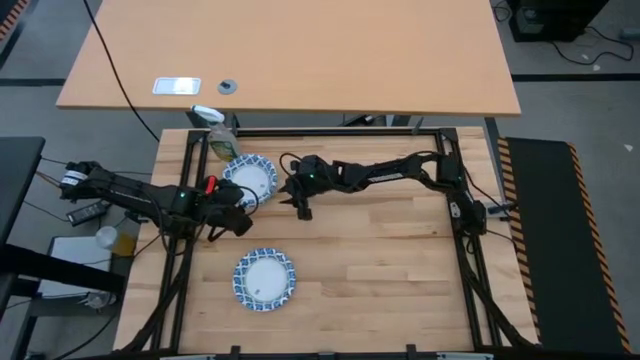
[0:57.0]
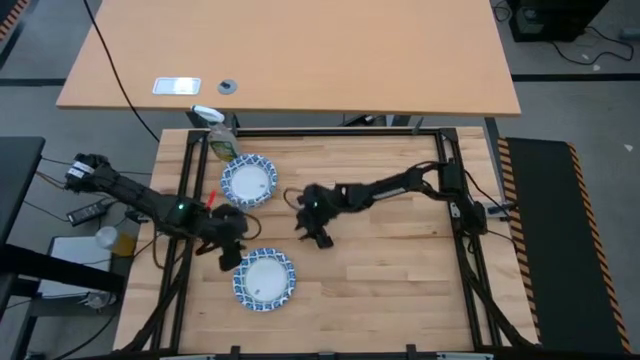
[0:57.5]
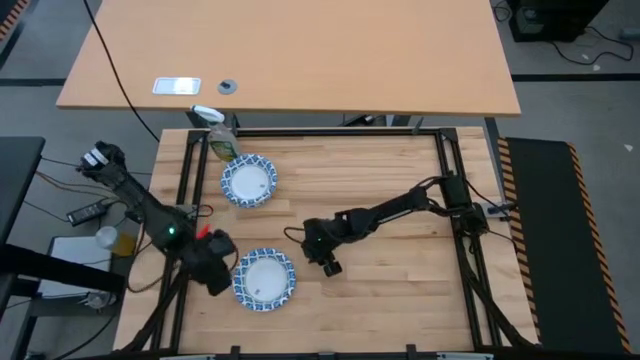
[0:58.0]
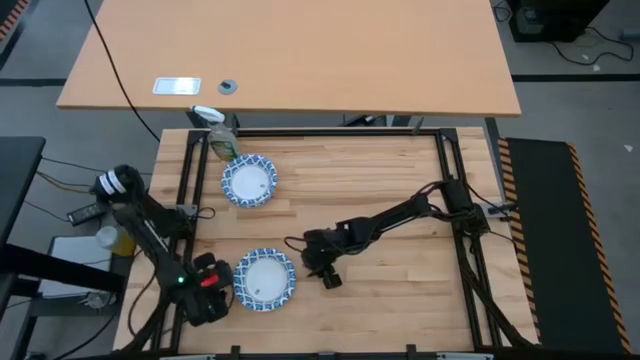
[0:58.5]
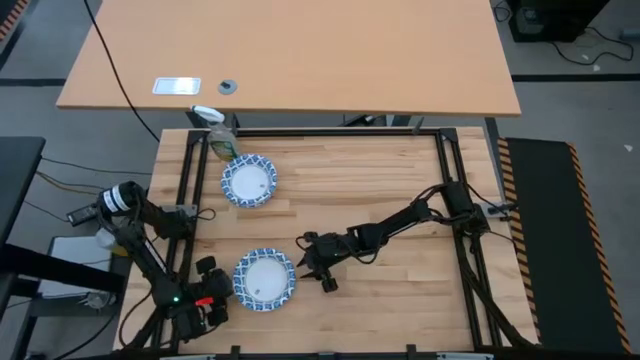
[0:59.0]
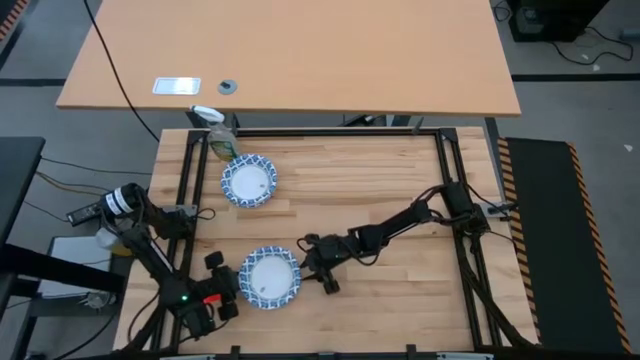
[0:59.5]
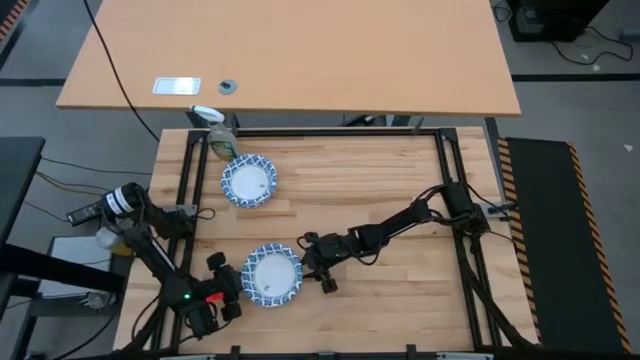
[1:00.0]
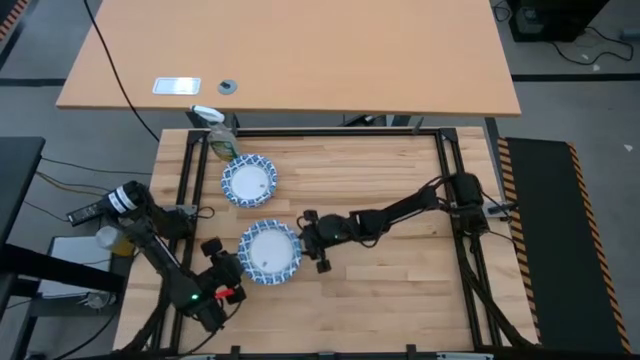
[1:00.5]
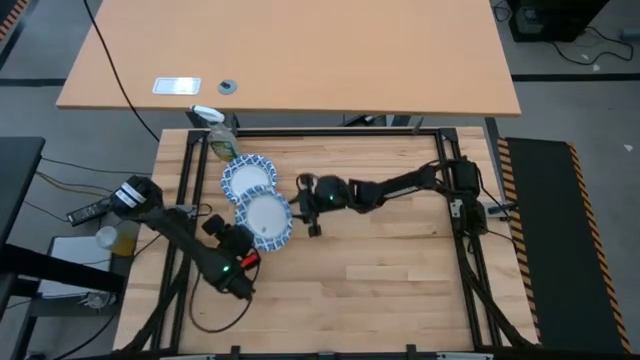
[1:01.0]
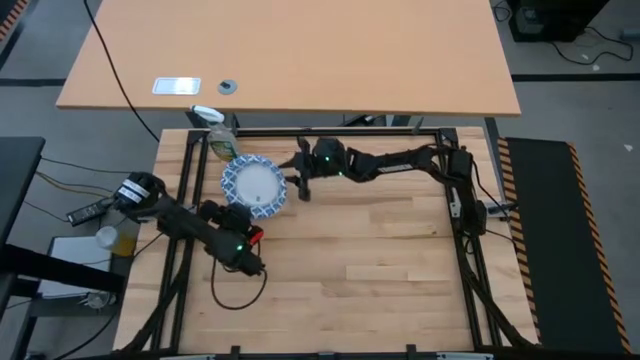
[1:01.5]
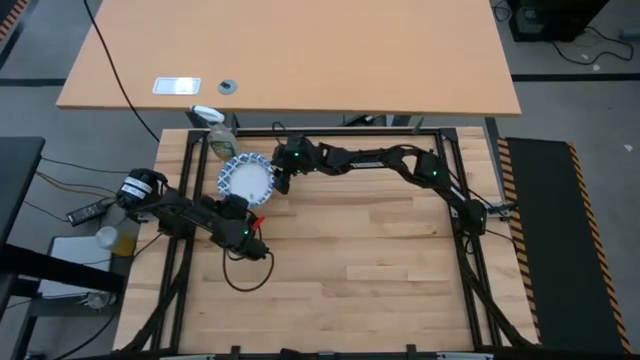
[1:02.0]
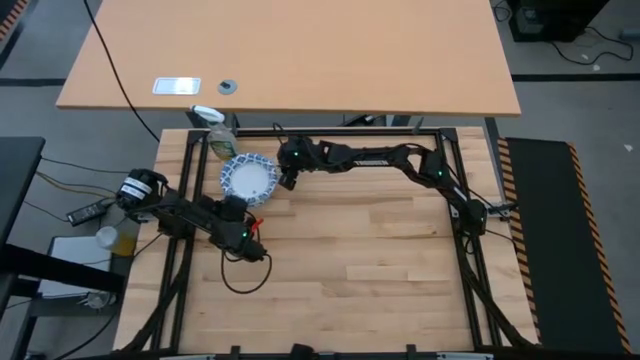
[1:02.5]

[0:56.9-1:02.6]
Stack the white bowl on top of the other white bowl

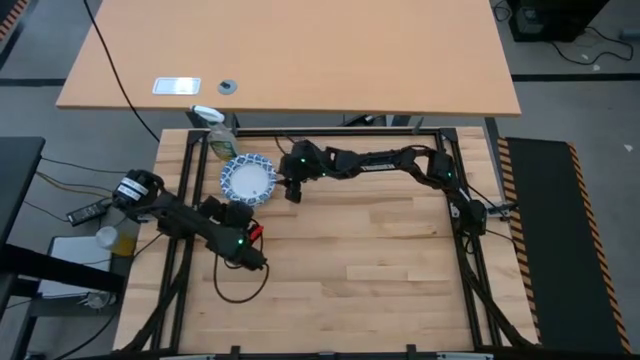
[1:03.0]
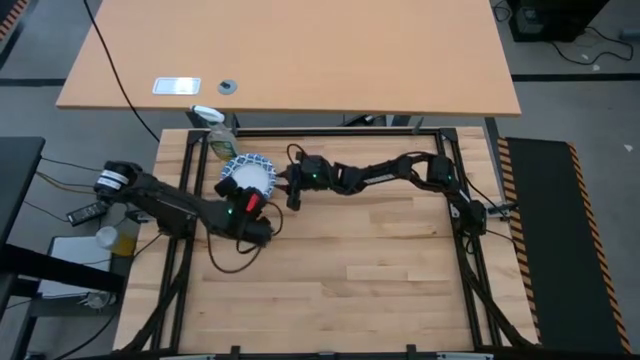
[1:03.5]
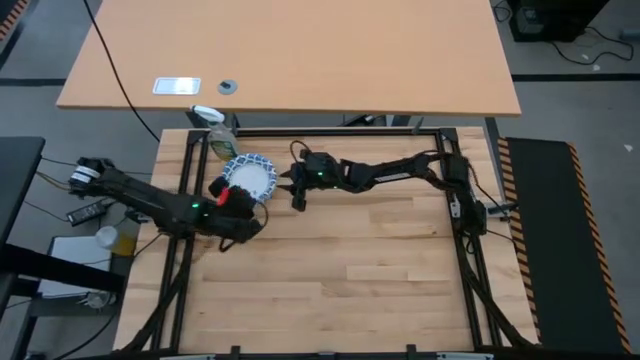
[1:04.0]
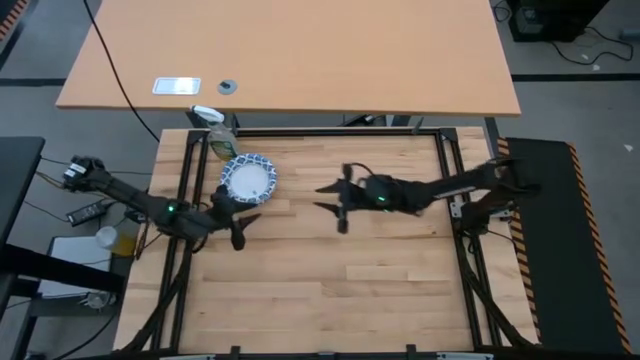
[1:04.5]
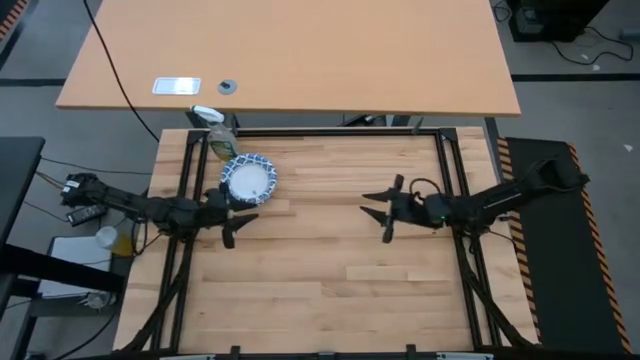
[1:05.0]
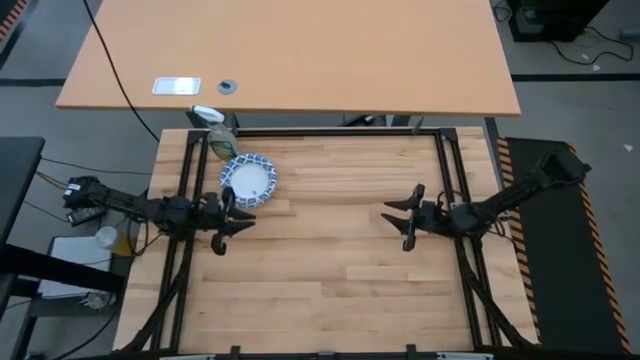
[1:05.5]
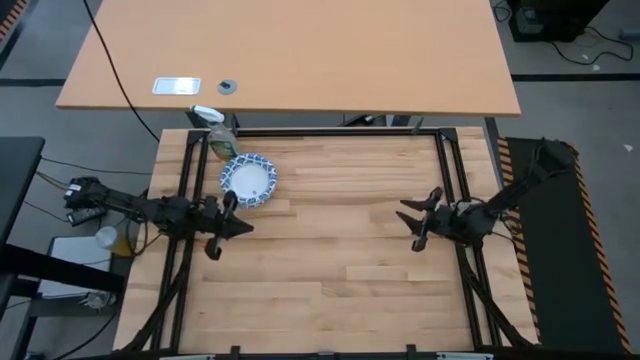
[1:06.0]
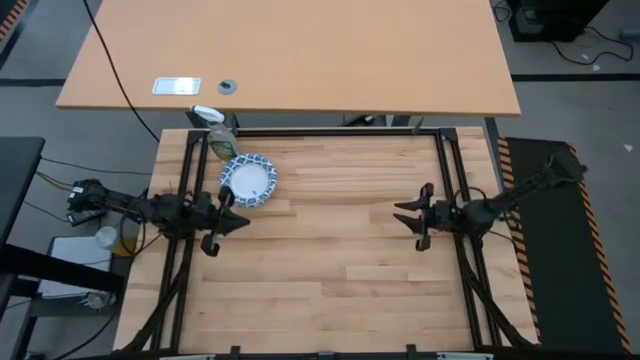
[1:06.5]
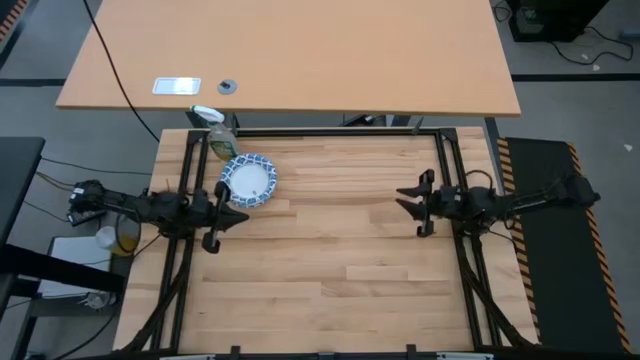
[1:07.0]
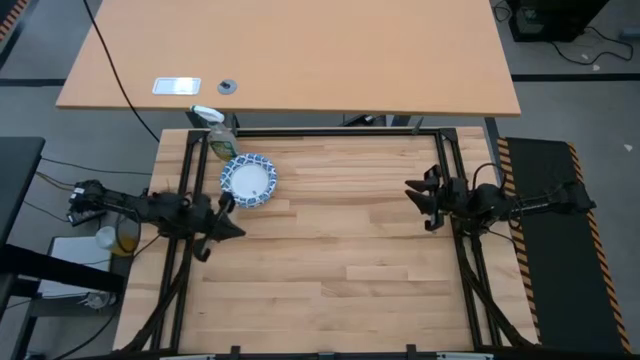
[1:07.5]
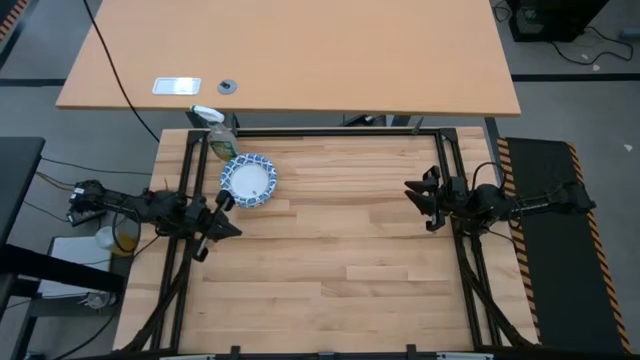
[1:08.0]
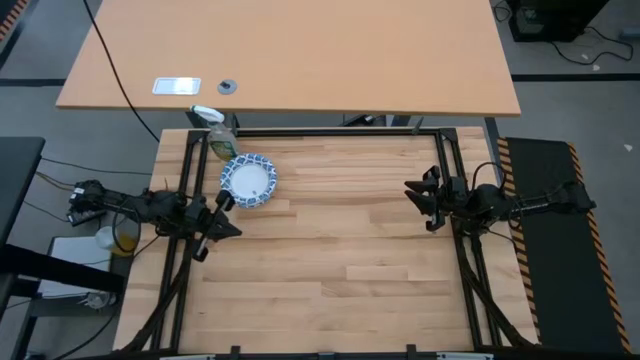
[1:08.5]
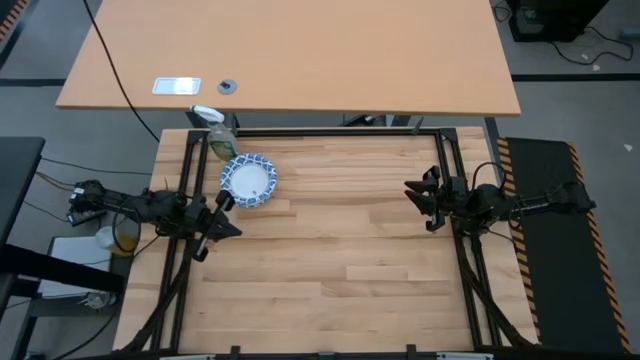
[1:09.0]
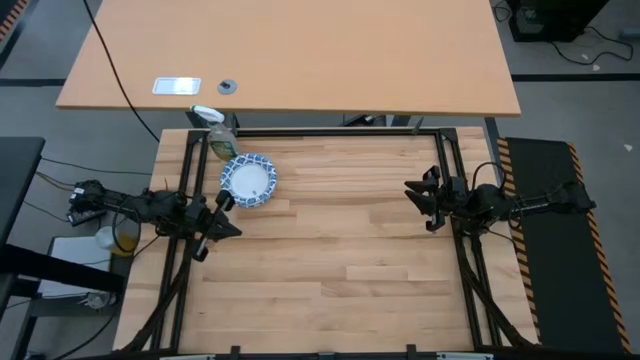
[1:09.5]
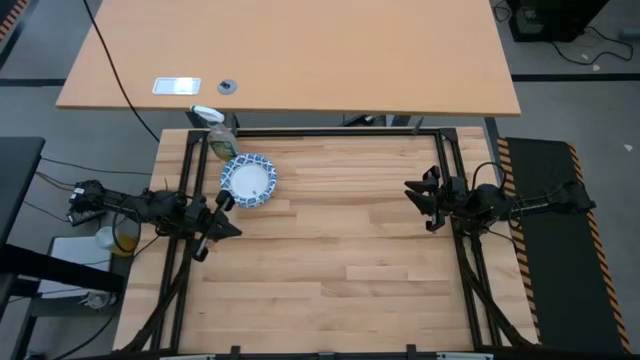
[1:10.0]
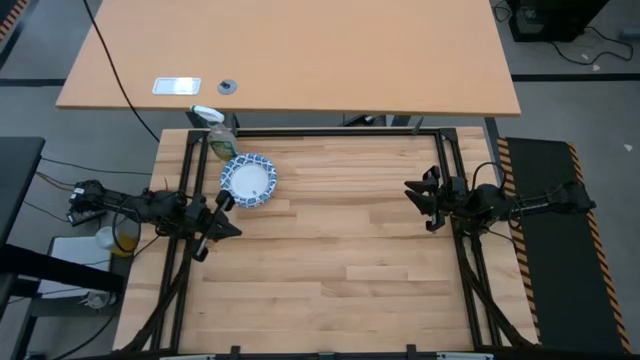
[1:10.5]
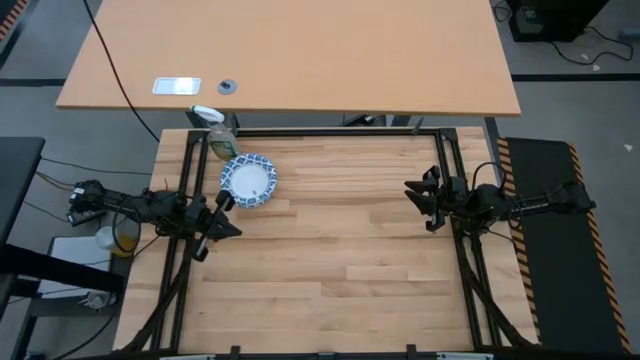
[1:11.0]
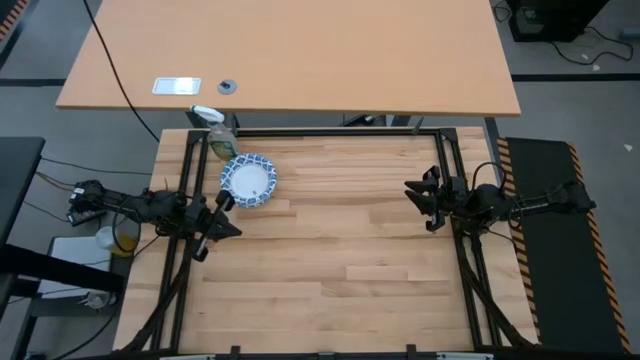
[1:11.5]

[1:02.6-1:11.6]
Return to Home Position

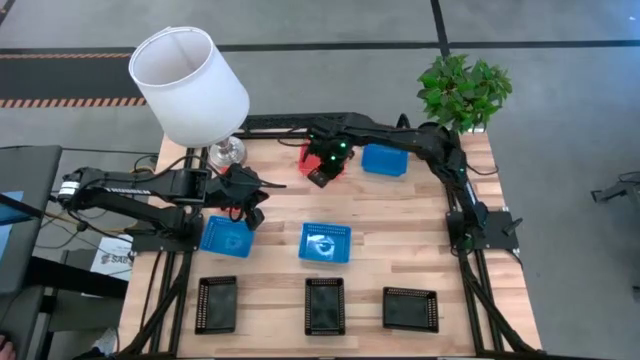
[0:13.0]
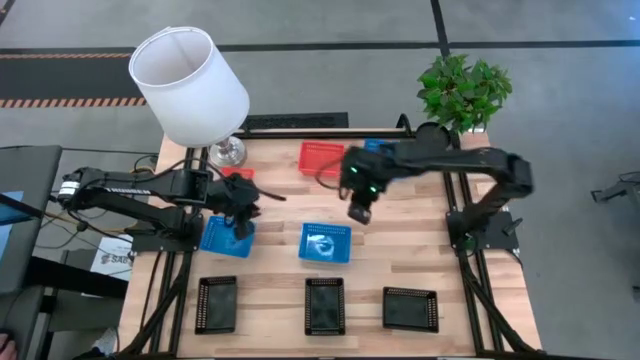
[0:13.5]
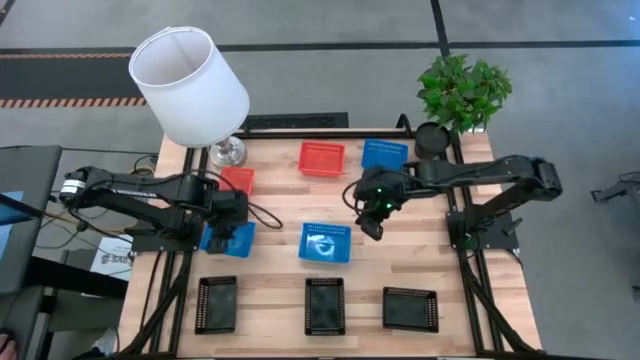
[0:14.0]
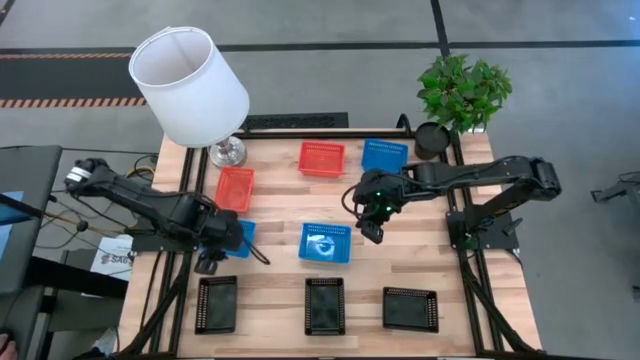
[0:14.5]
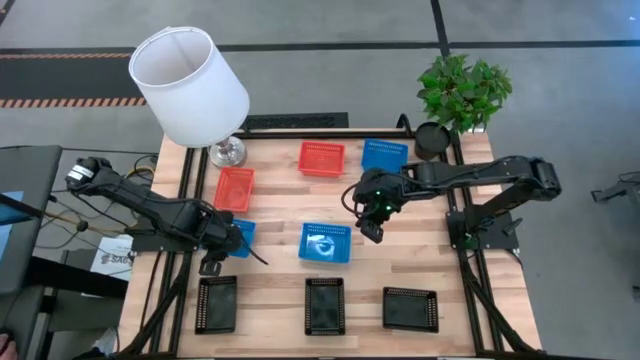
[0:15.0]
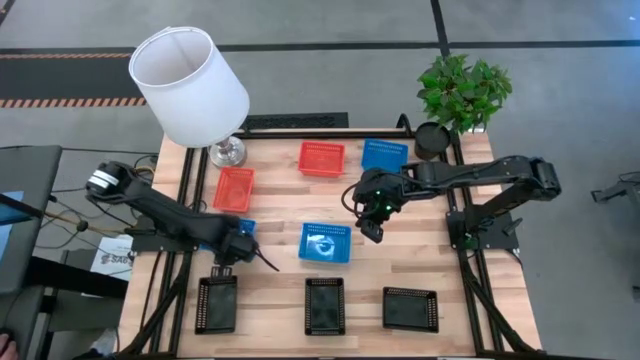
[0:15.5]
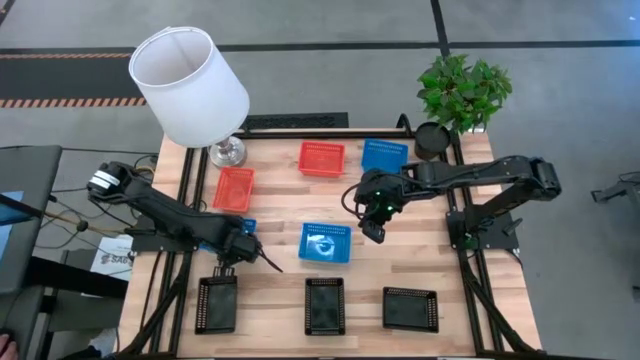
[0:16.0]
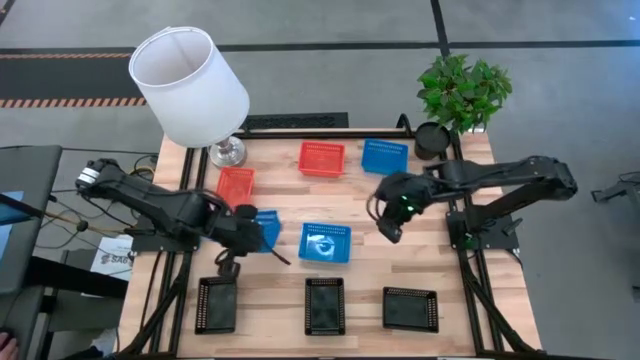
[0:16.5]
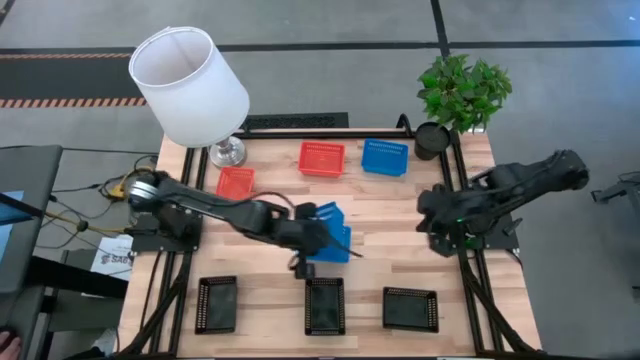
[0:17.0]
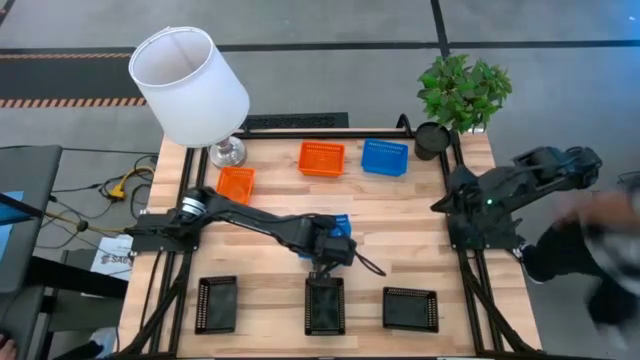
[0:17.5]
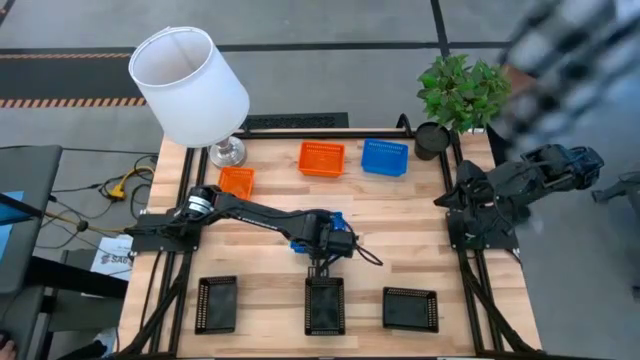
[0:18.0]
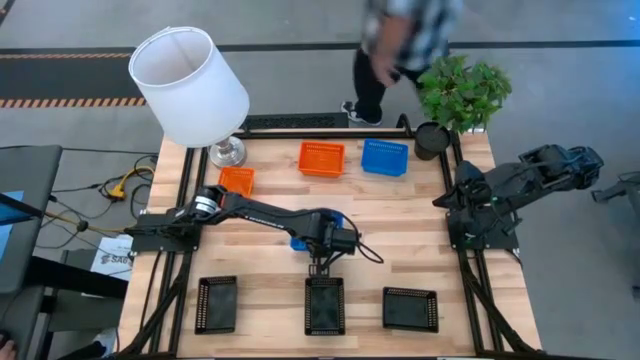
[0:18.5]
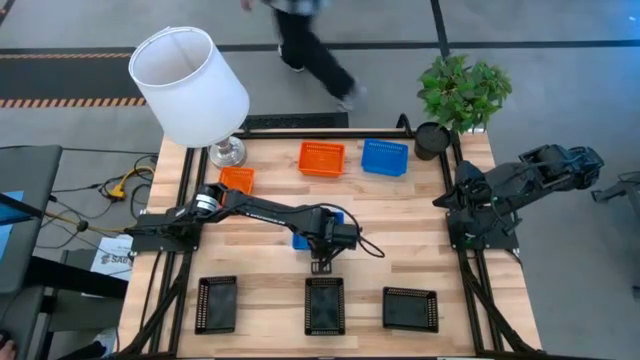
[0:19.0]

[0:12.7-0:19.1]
Stack the bottom left blue bin on the bottom right blue bin
